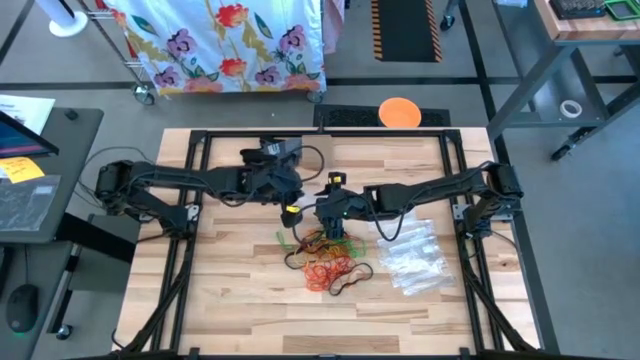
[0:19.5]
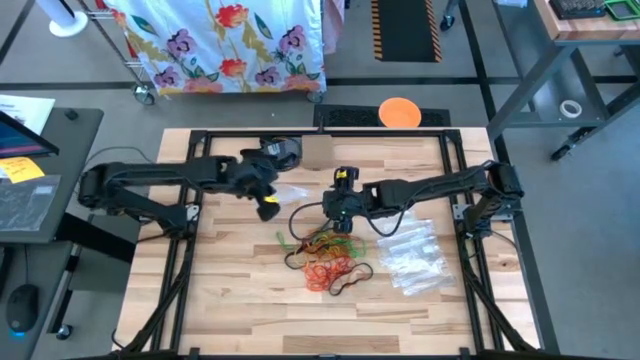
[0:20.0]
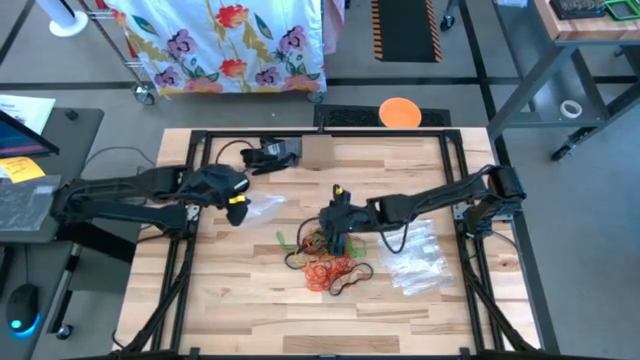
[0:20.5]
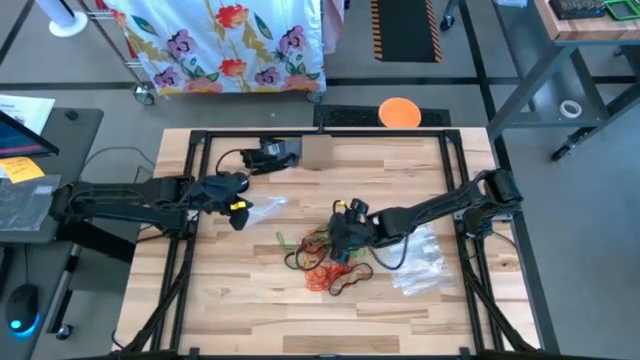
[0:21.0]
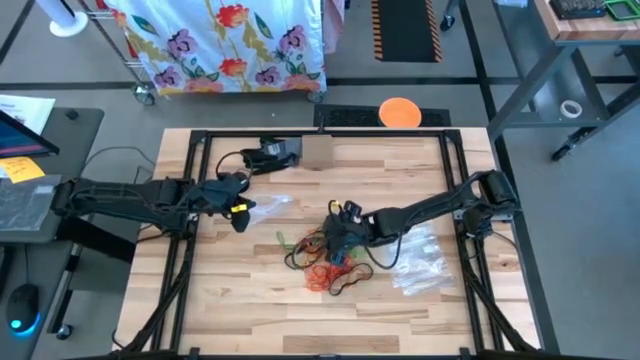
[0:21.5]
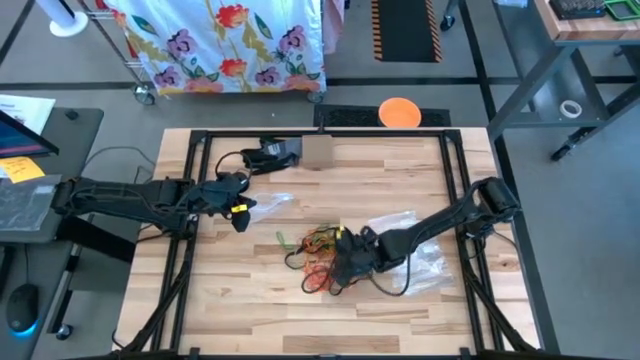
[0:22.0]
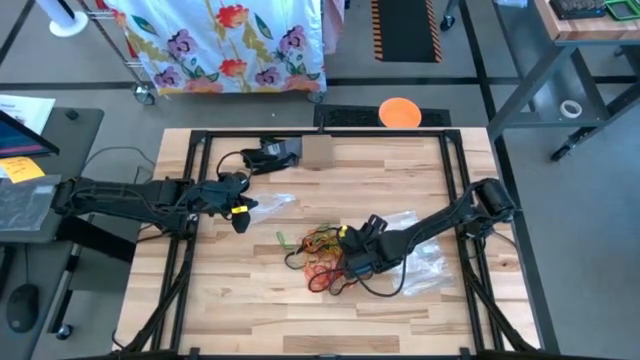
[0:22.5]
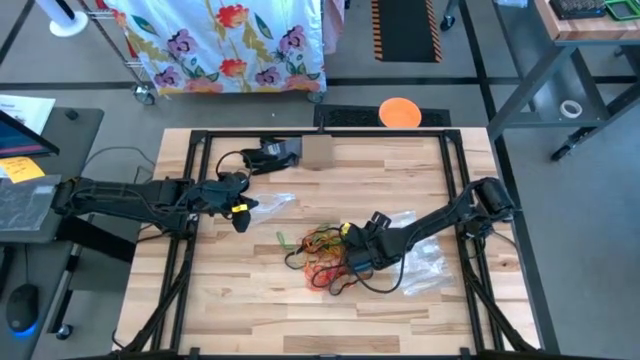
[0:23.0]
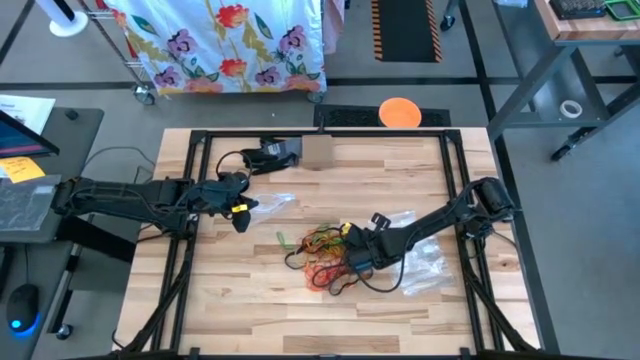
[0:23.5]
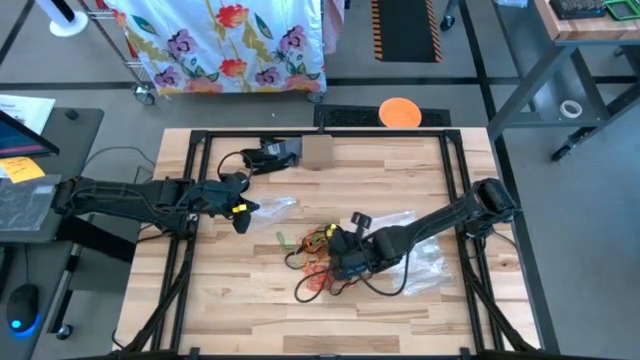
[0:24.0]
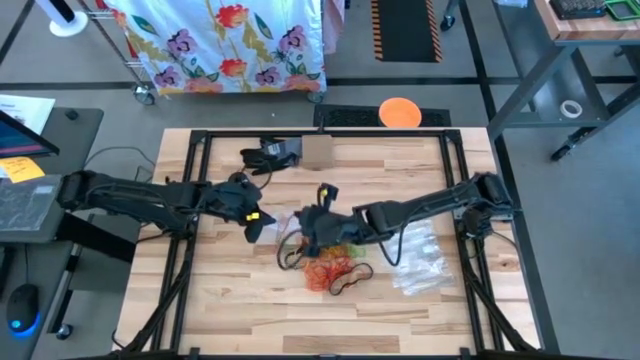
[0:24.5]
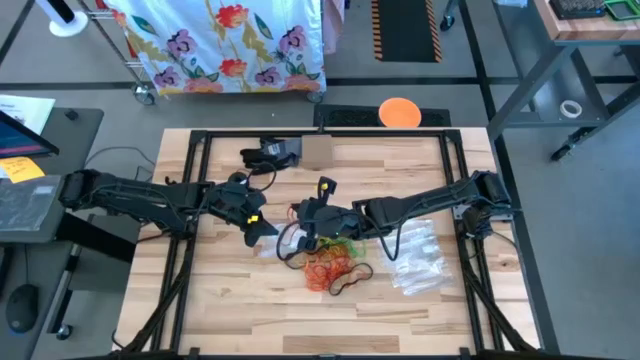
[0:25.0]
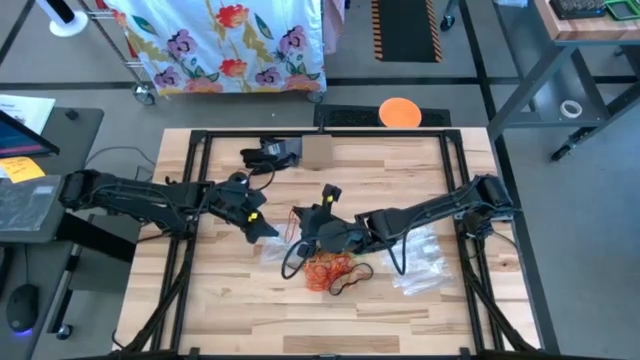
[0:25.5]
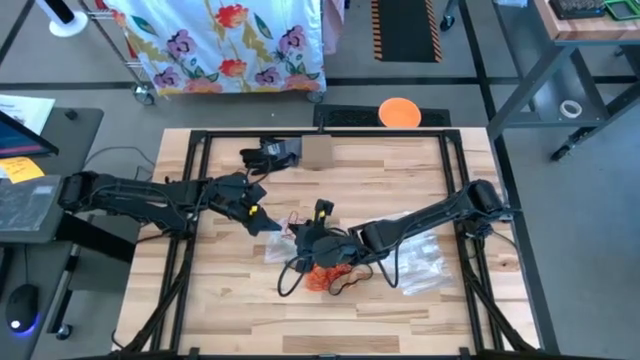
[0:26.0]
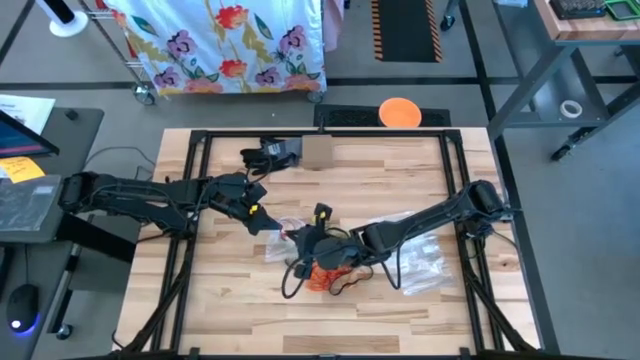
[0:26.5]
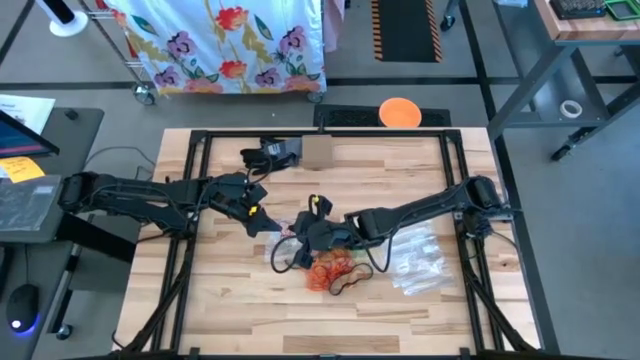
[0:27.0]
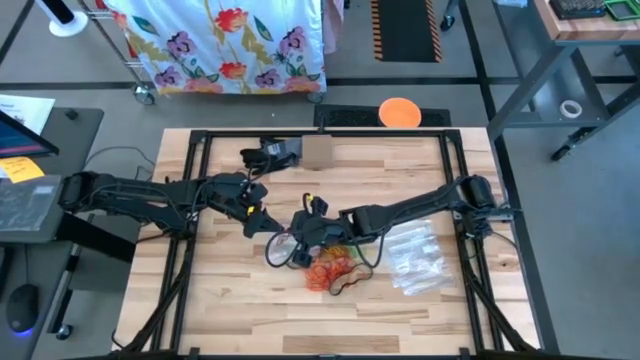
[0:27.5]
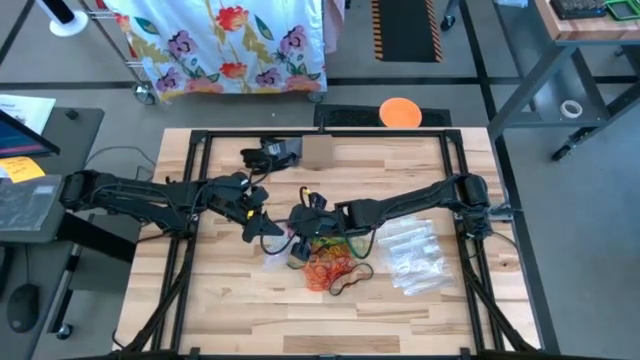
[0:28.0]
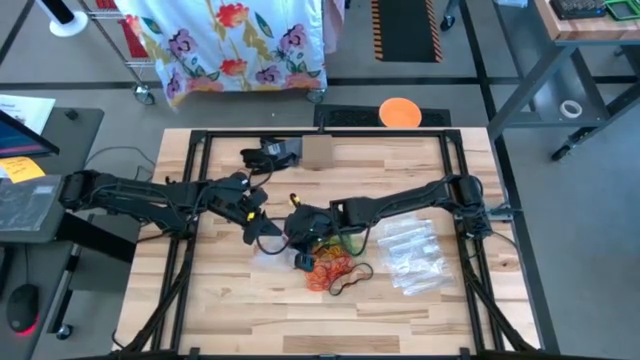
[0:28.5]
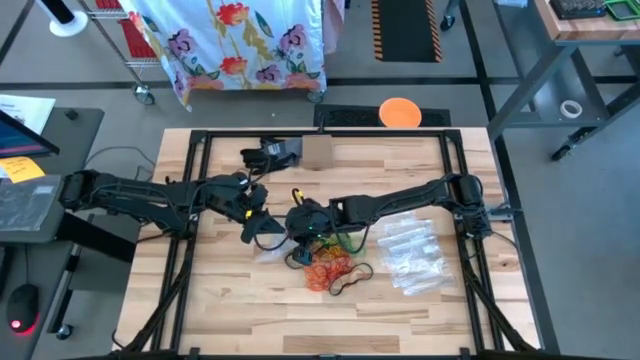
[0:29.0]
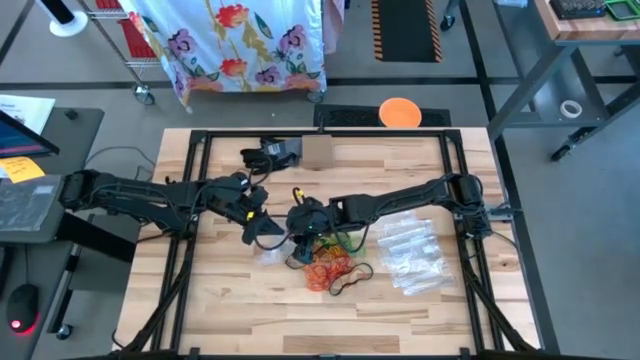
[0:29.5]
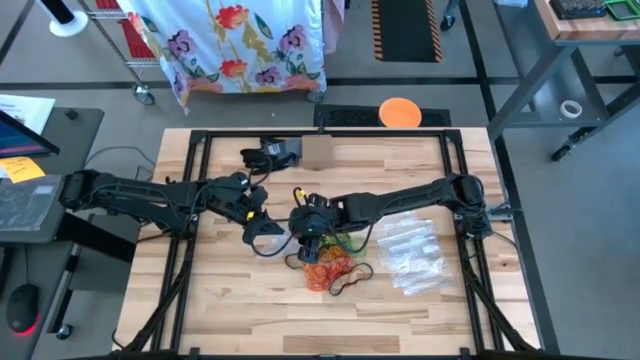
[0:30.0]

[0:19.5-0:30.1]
Task: Sort rubber bands
Put the red rubber band into the transparent zip bag

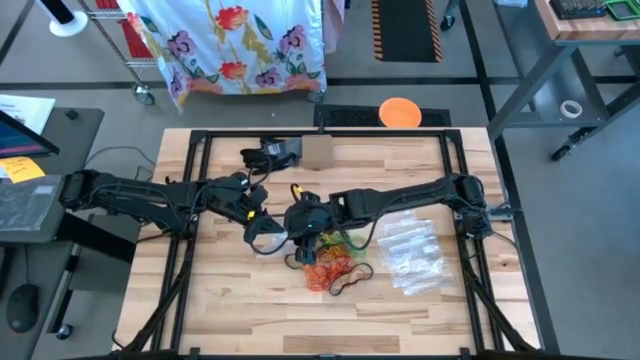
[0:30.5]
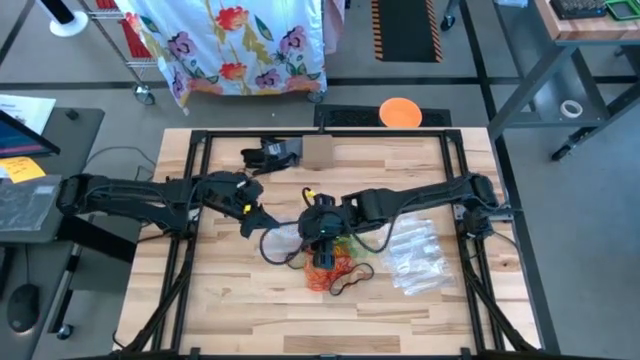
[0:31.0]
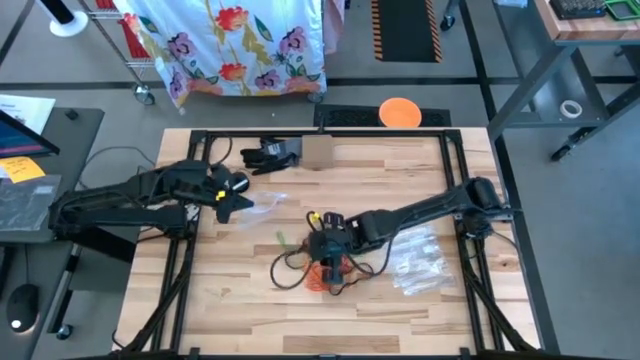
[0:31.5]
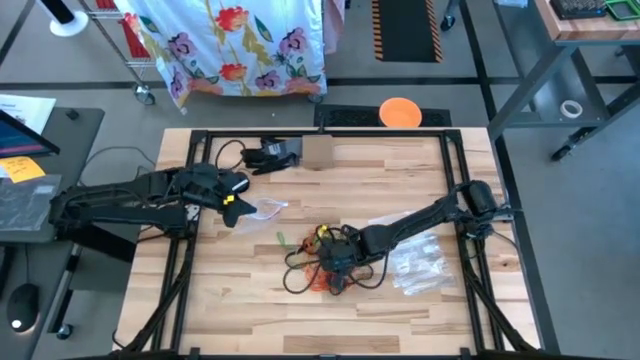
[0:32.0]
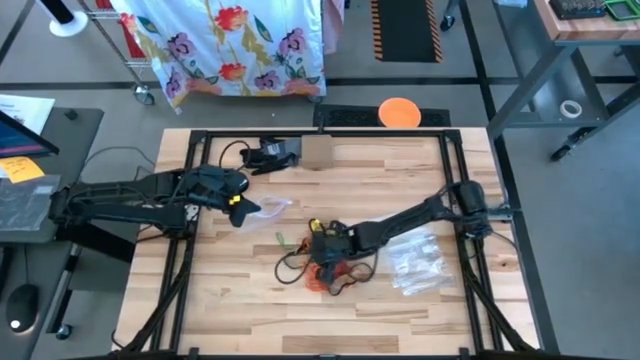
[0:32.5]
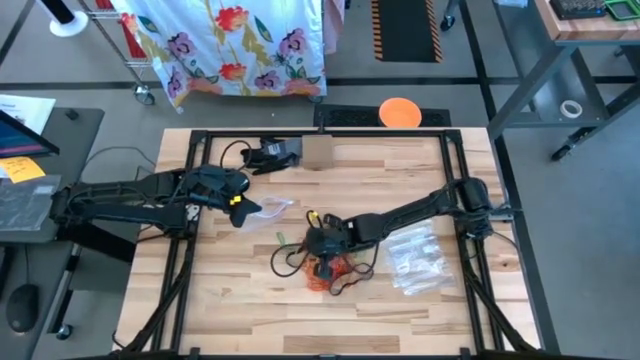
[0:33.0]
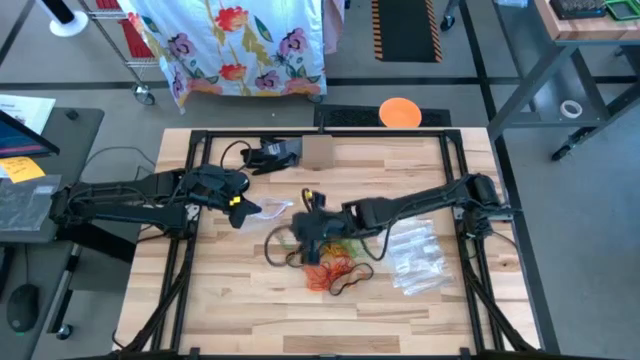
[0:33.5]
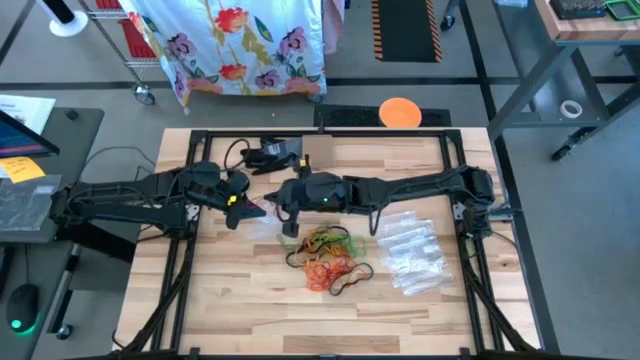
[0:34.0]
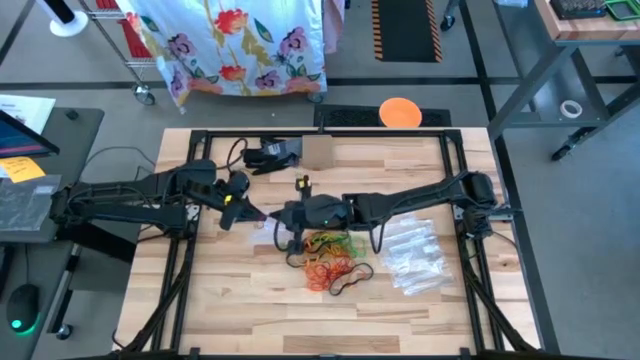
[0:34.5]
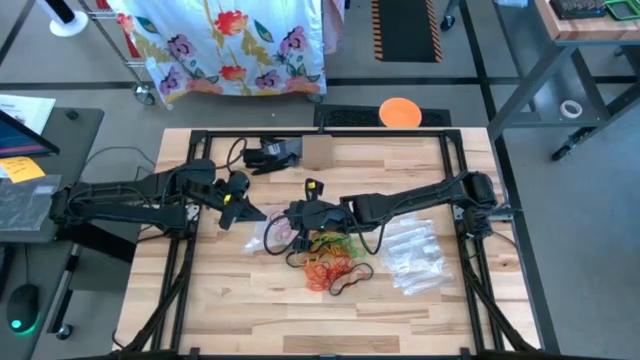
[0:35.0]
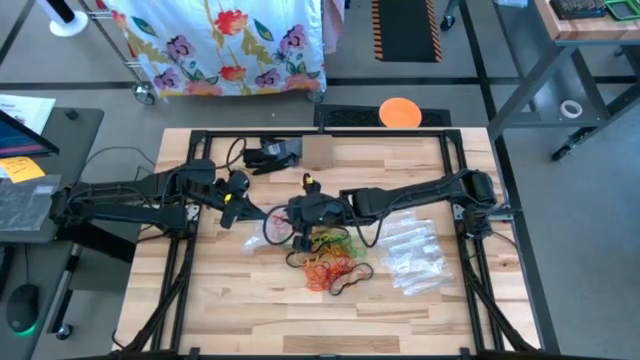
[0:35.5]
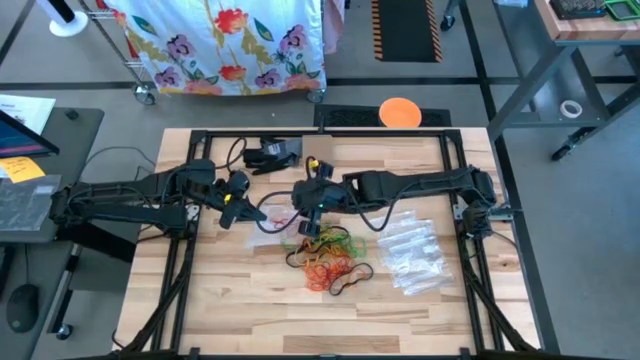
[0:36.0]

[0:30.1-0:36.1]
Put the red rubber band into the transparent zip bag

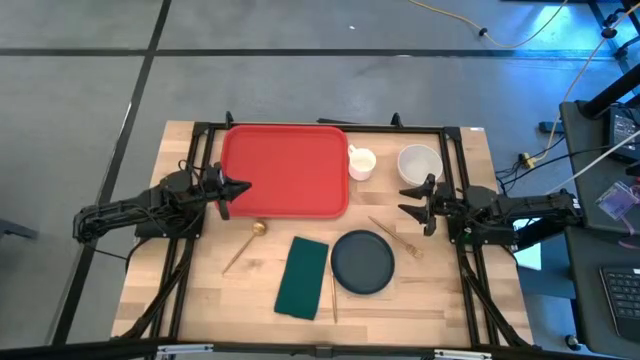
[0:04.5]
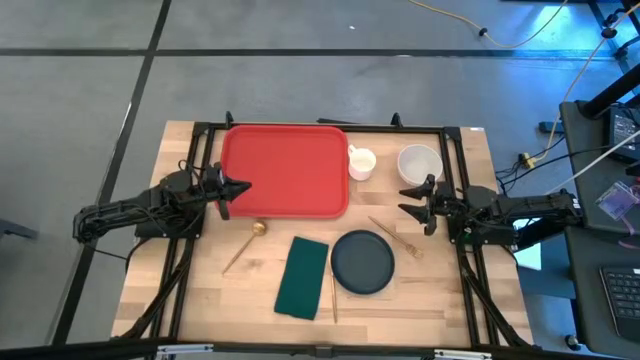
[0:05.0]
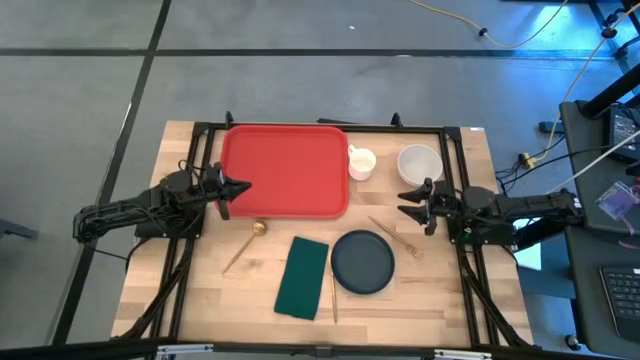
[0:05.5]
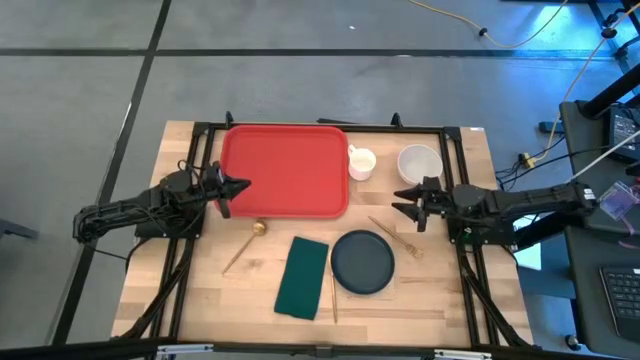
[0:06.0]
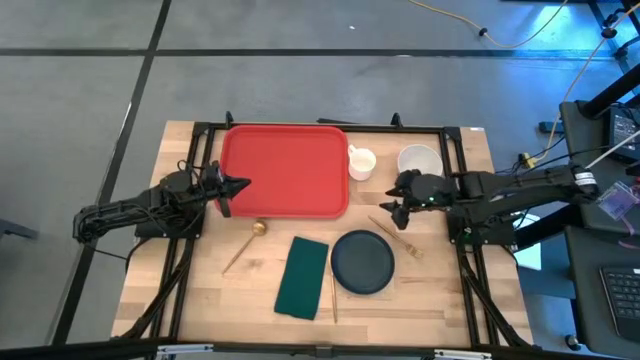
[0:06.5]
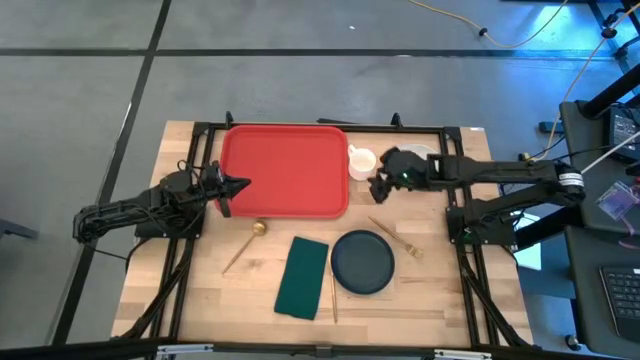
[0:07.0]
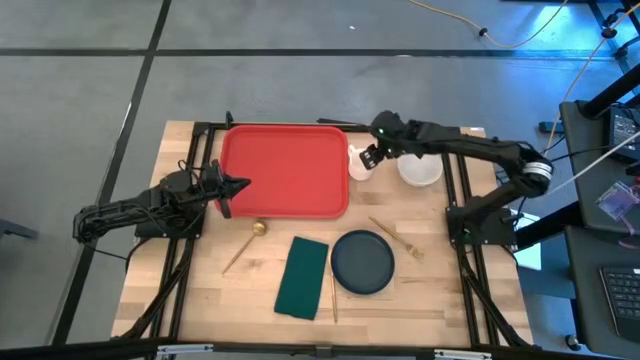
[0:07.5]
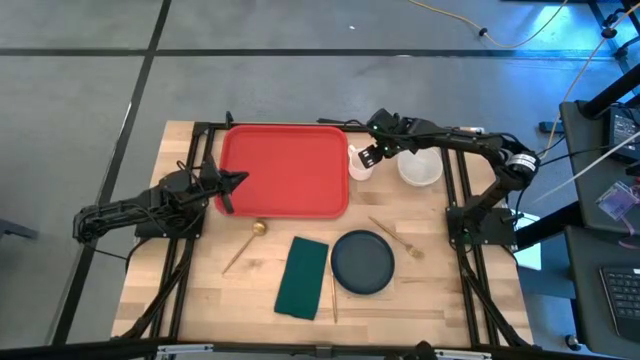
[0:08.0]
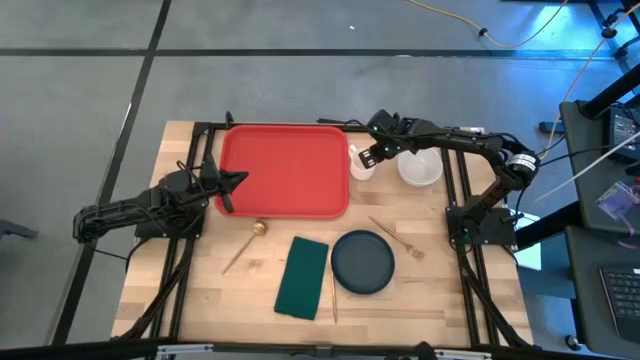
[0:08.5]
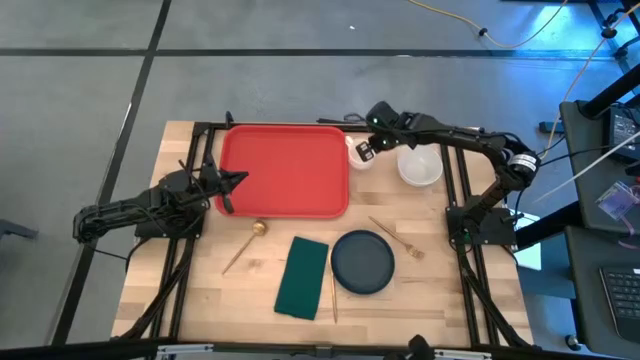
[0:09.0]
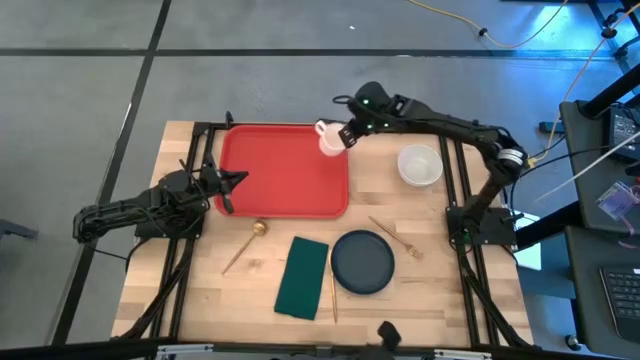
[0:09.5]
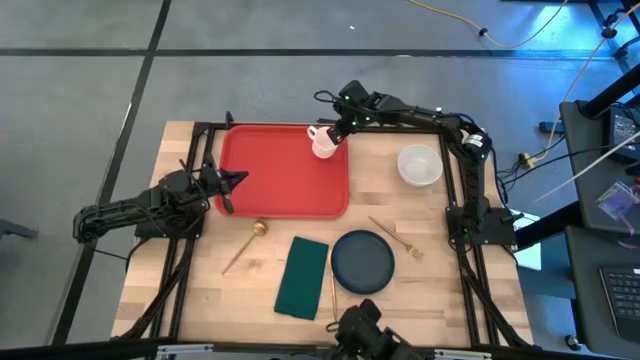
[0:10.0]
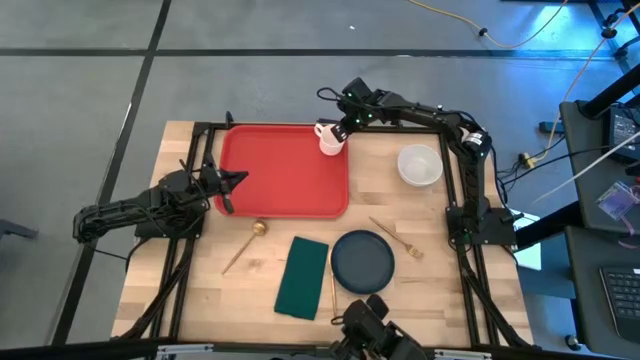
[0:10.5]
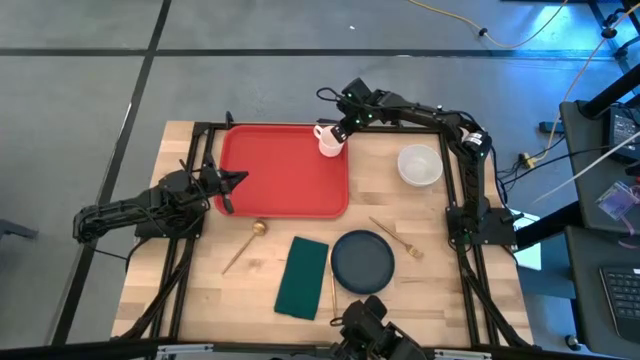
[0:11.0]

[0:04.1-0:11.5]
Task: Set up tray
Put the white mug on the top right of the red tray
